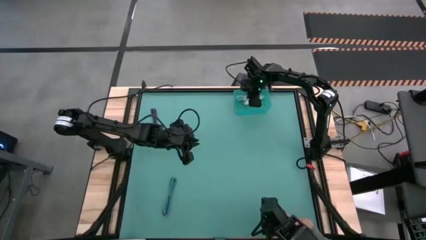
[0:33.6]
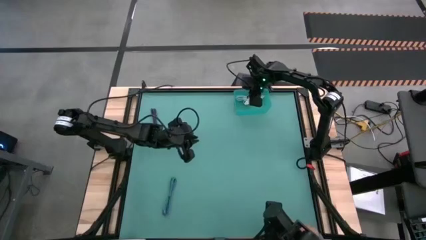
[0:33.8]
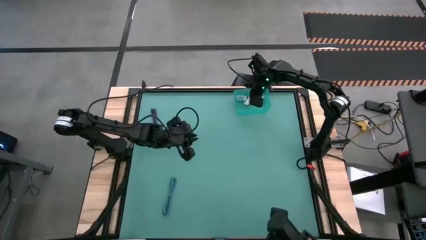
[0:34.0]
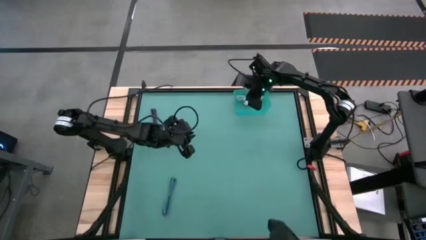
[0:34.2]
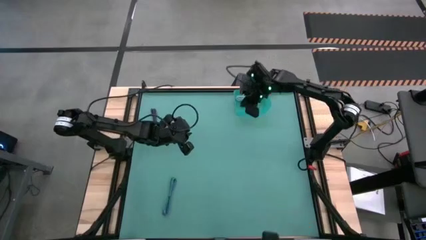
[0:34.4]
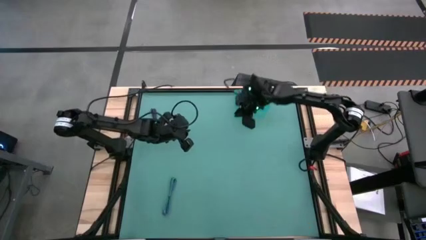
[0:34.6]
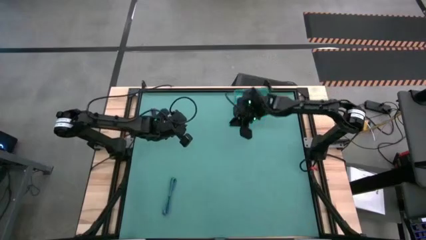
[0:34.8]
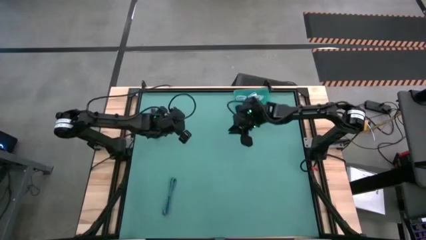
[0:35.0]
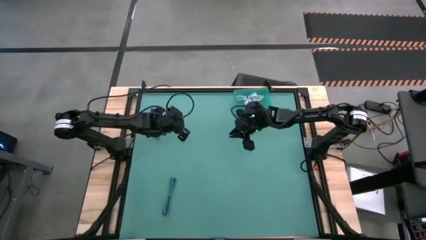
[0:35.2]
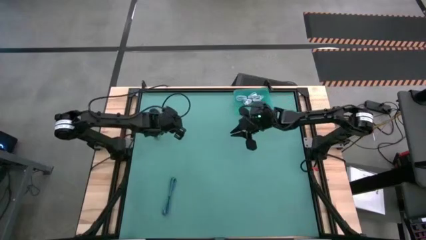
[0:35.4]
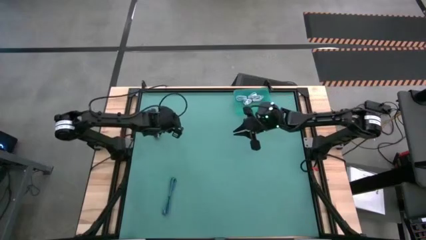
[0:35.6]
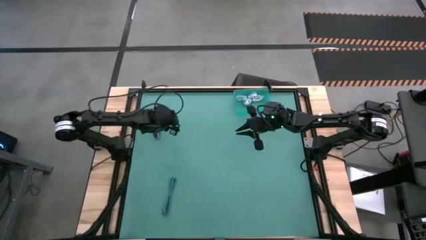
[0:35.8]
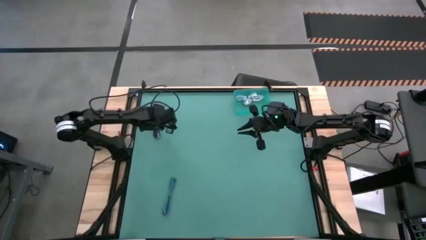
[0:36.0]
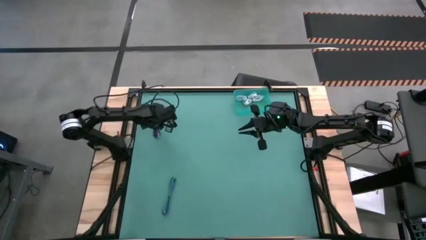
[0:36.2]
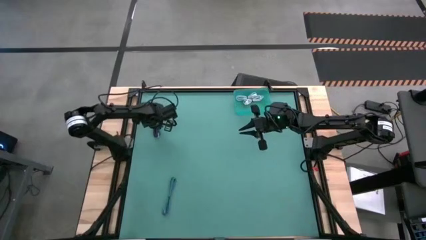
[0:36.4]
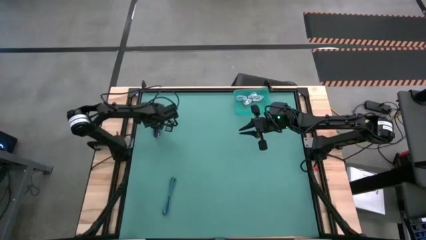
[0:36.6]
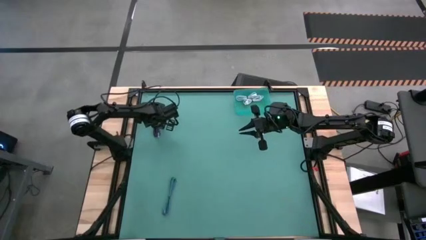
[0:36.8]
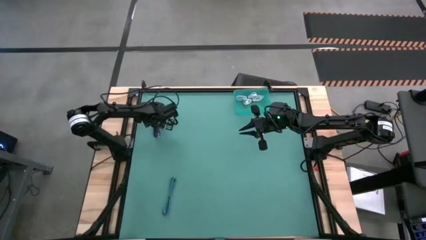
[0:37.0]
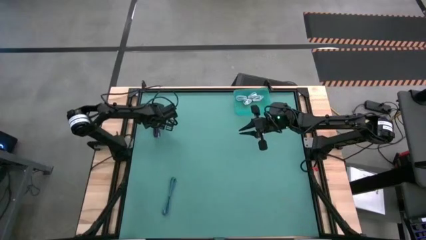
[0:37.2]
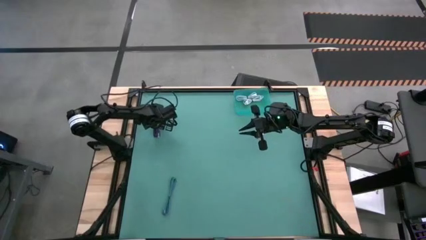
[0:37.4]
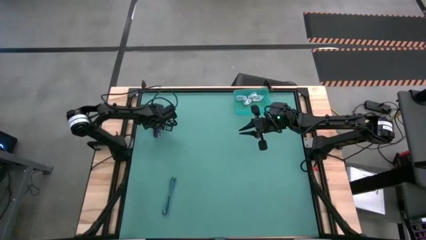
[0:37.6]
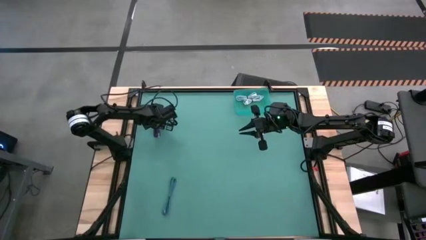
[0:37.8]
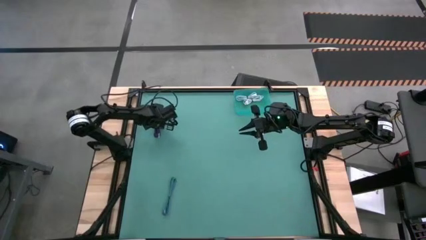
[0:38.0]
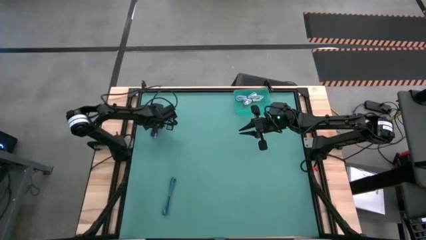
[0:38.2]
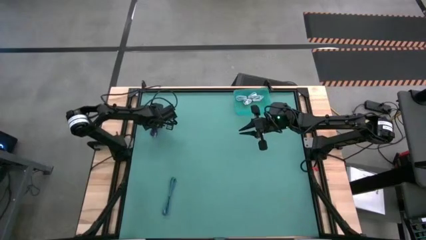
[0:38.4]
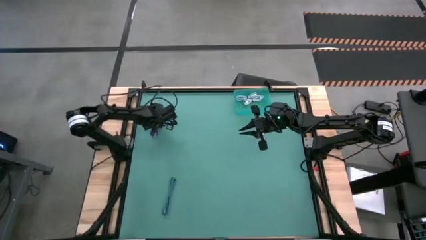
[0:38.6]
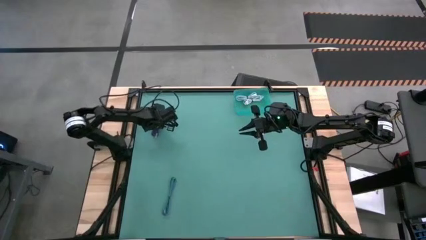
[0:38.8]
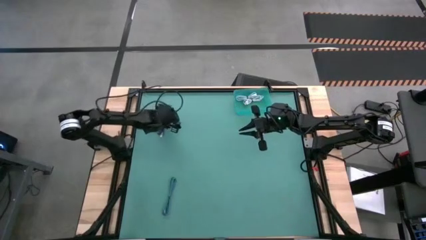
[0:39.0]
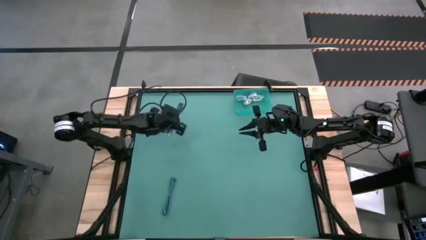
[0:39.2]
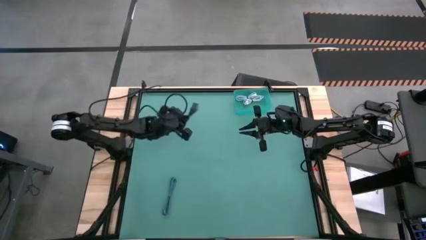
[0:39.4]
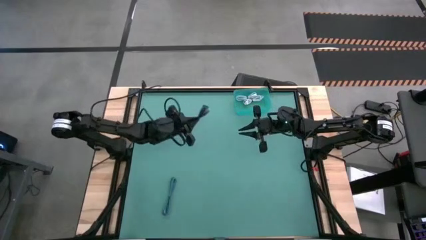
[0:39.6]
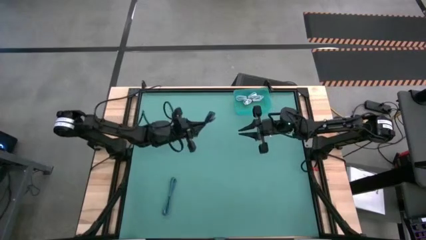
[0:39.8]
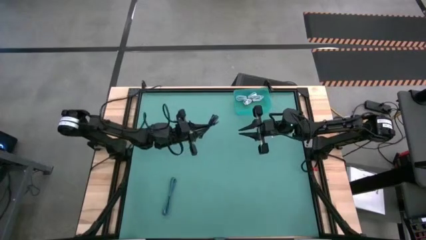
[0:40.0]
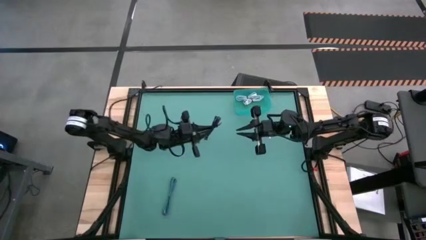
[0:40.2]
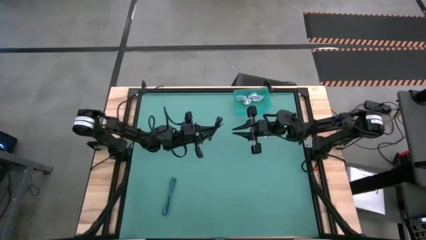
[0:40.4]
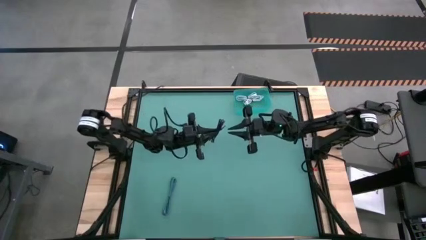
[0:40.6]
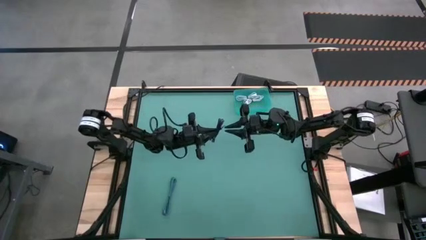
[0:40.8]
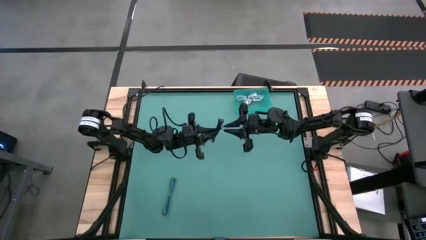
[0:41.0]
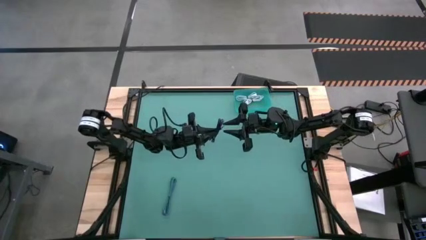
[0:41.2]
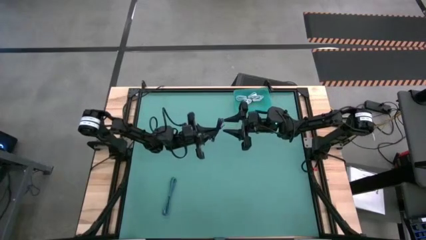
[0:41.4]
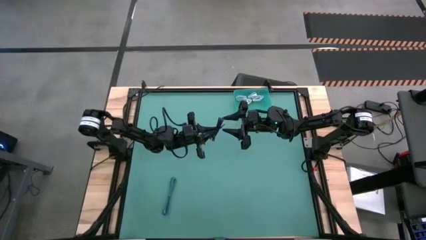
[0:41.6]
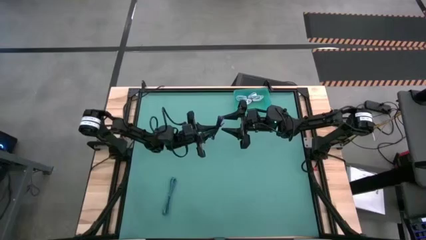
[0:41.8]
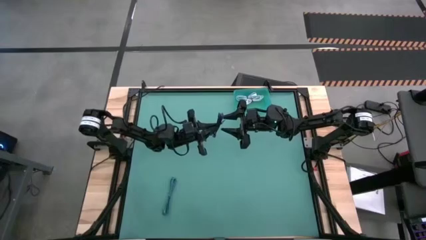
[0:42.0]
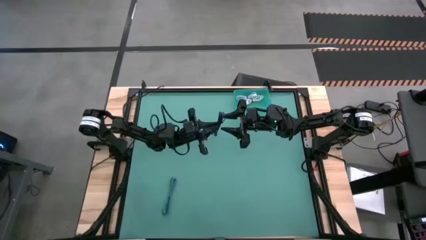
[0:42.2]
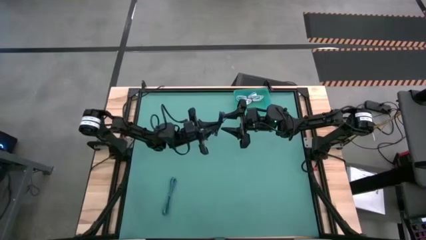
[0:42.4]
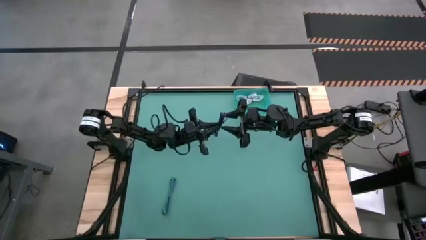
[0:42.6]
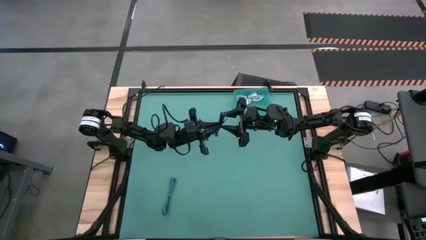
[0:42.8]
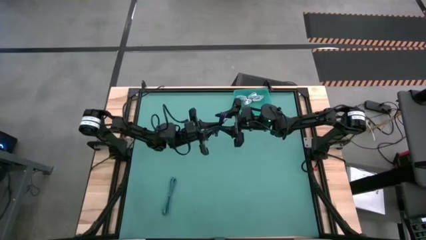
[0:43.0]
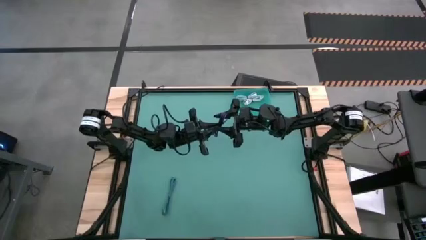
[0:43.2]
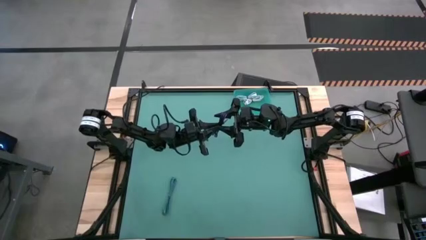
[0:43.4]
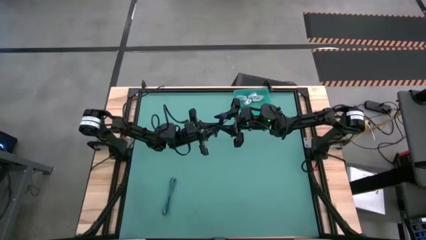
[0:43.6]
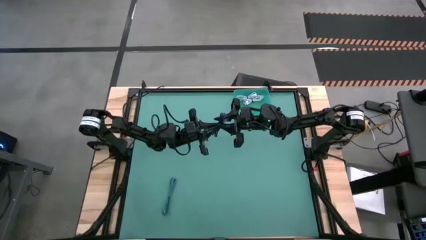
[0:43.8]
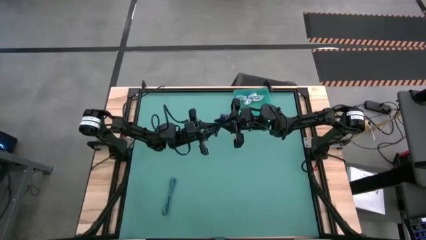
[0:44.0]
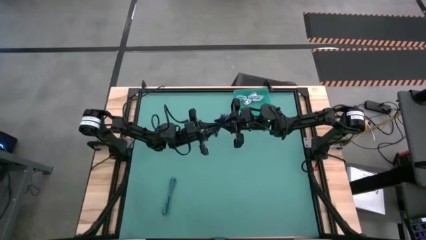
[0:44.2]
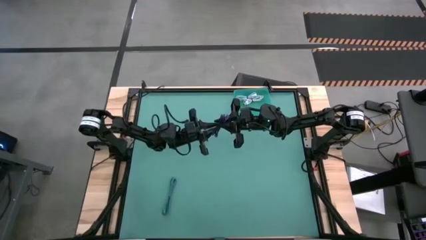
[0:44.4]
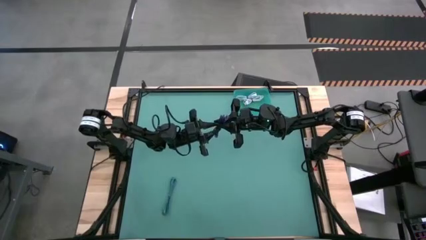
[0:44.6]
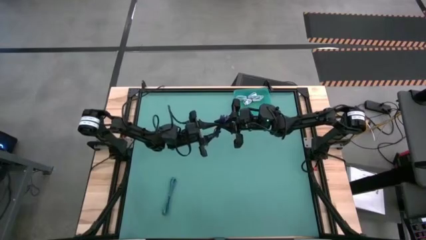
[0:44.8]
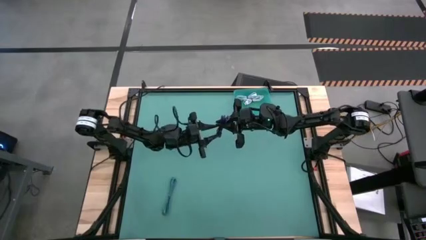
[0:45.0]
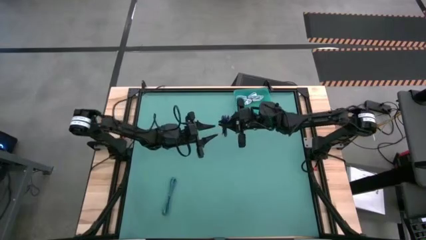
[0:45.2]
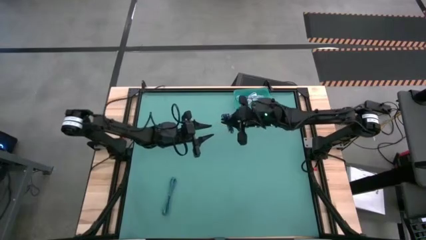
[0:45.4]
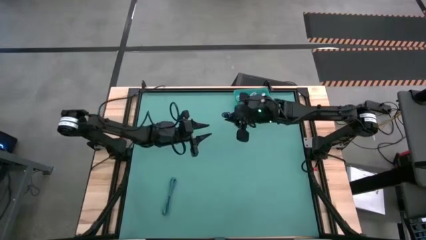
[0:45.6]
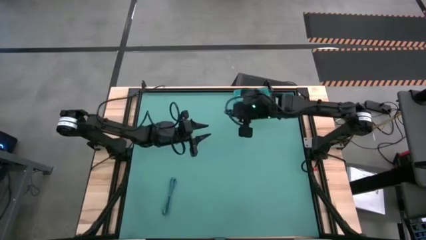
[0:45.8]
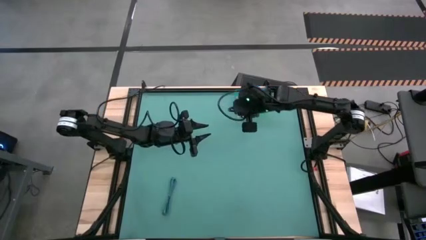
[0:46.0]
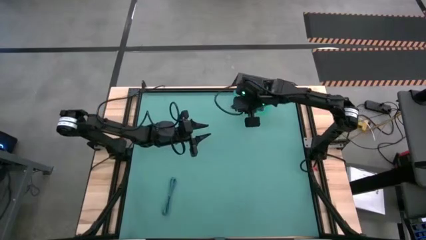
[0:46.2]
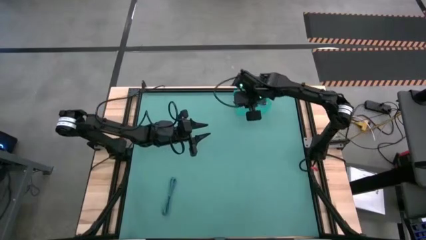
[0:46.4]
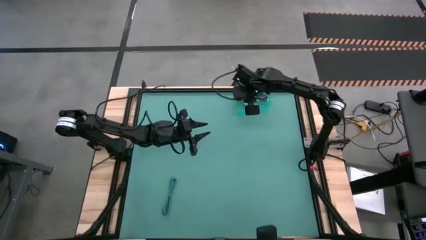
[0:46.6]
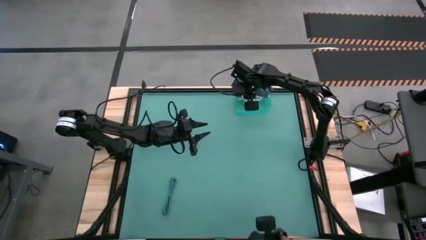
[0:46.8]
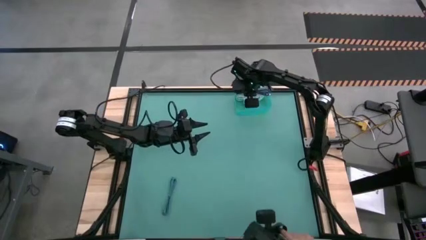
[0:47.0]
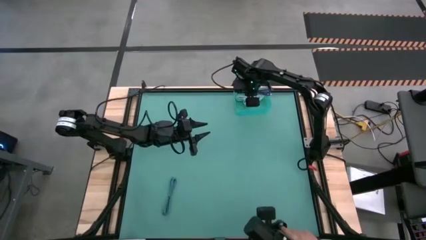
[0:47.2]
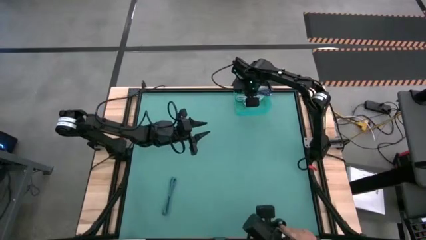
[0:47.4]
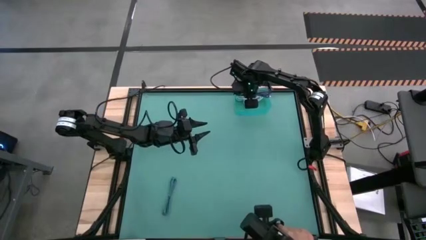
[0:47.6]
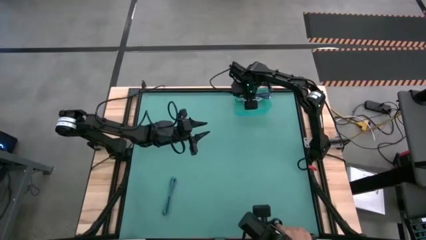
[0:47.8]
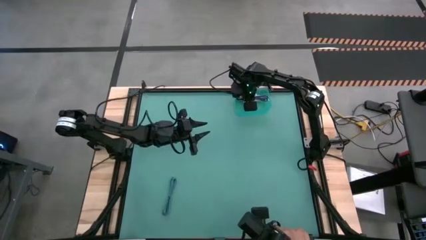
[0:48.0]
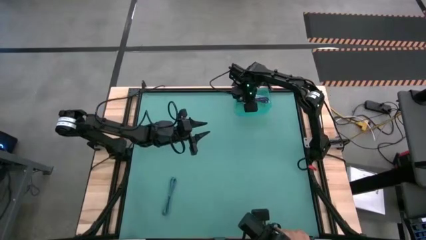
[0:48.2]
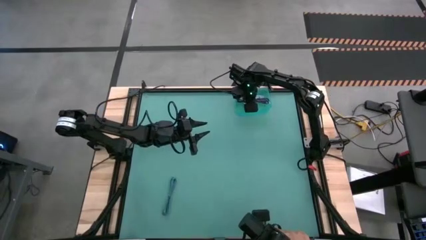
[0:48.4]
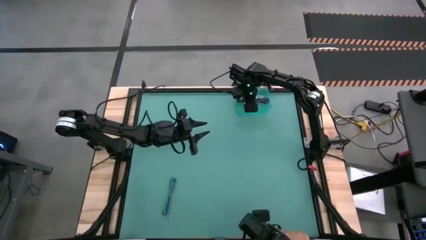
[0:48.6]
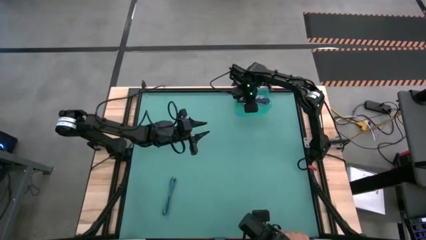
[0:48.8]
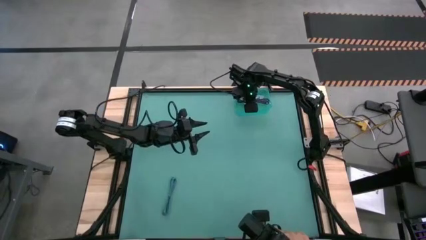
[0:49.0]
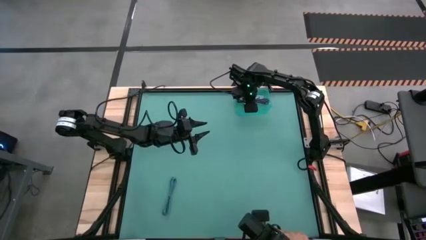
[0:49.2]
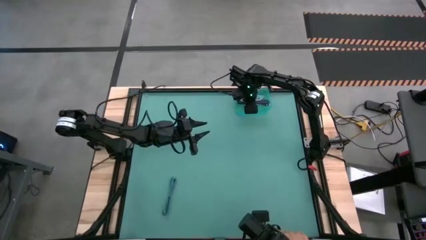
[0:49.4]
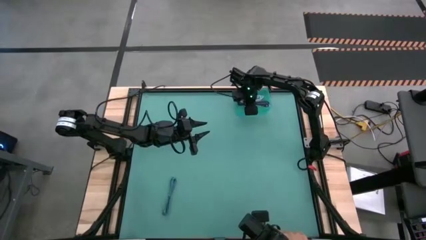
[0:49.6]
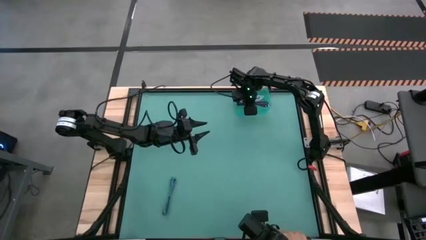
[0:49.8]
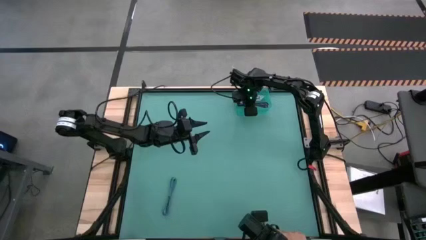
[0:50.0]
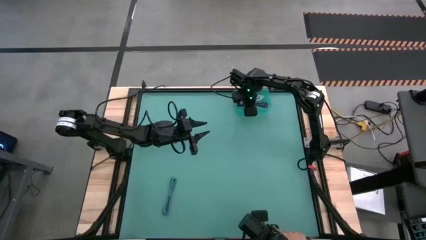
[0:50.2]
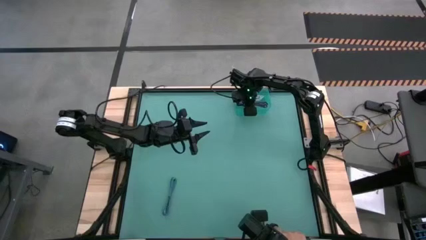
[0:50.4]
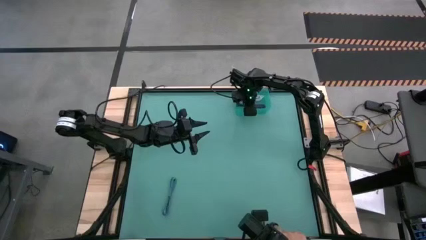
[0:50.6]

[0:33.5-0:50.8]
Task: Pick and place USB-C Cables
Put the purple charger cable into the blue bin
